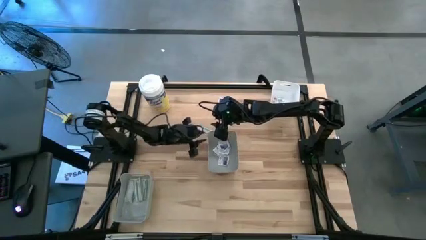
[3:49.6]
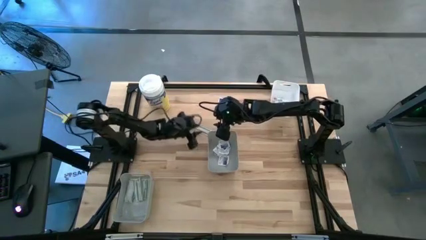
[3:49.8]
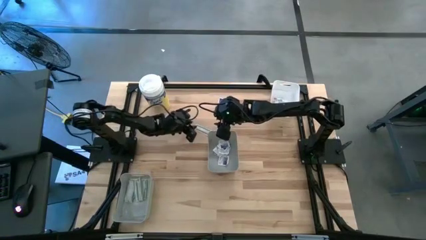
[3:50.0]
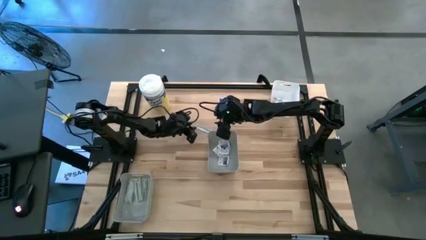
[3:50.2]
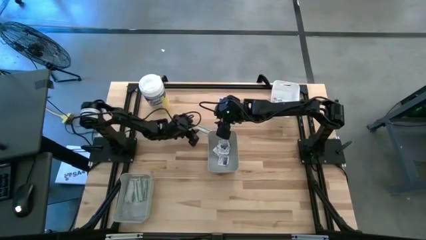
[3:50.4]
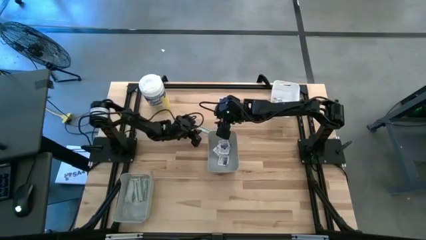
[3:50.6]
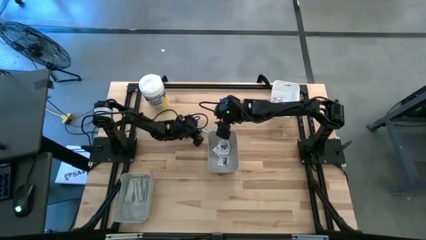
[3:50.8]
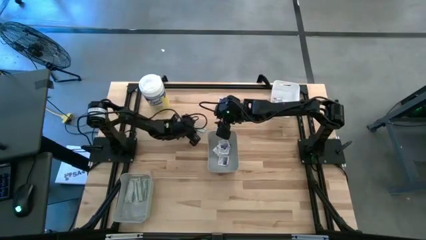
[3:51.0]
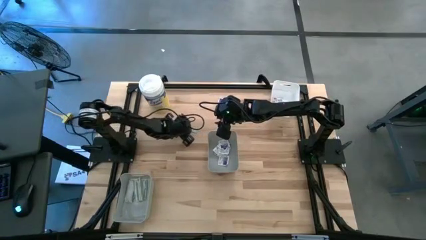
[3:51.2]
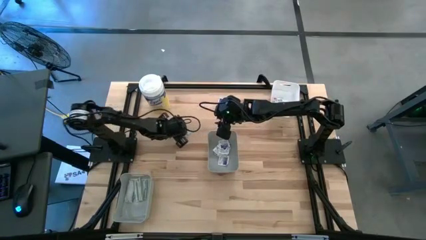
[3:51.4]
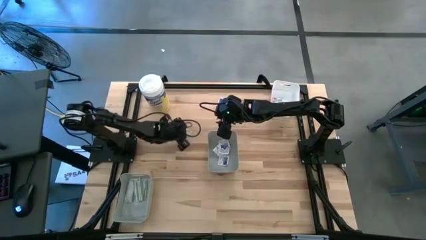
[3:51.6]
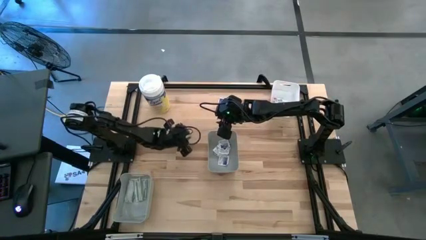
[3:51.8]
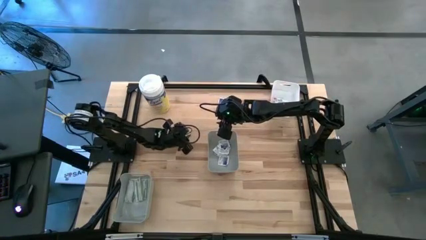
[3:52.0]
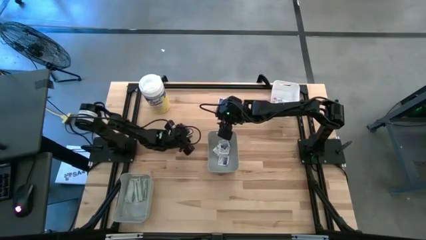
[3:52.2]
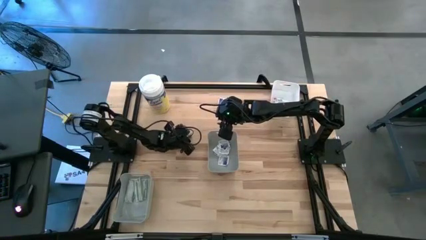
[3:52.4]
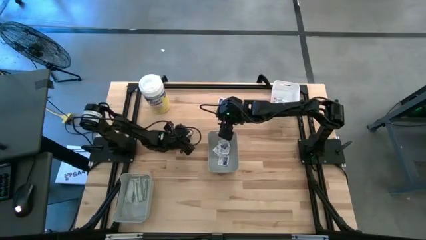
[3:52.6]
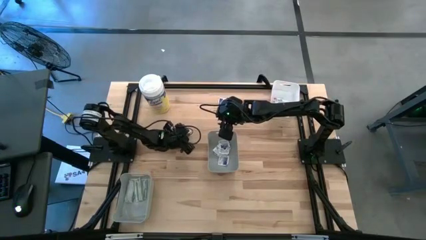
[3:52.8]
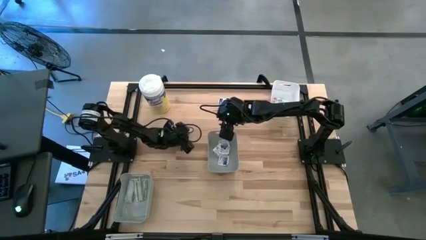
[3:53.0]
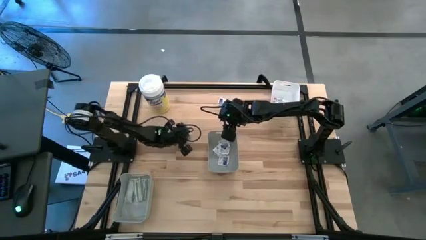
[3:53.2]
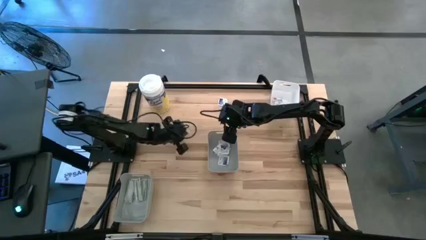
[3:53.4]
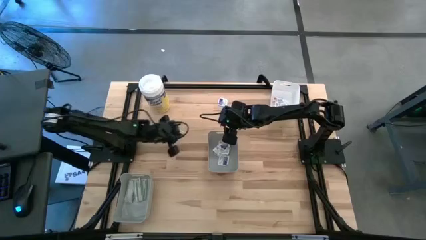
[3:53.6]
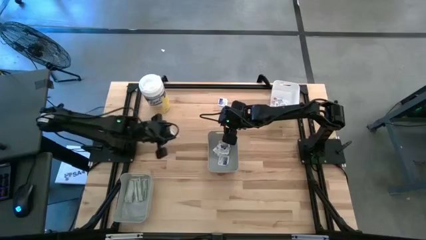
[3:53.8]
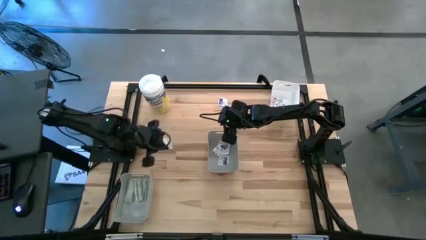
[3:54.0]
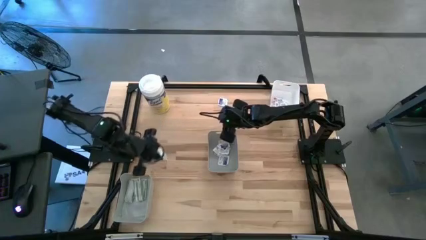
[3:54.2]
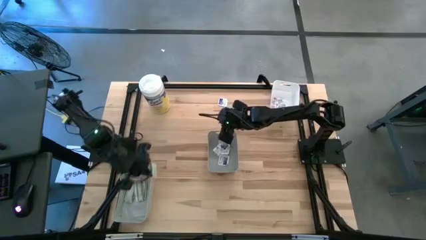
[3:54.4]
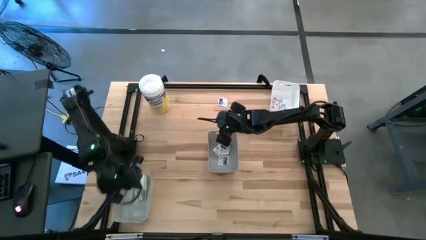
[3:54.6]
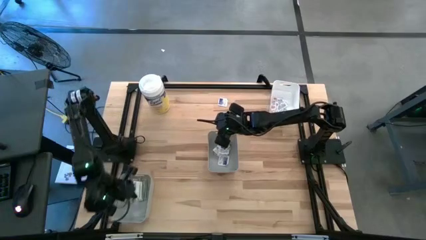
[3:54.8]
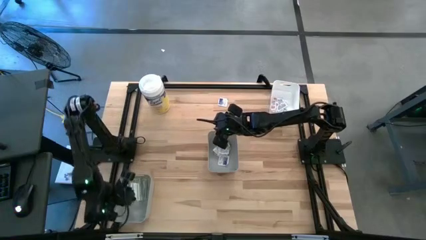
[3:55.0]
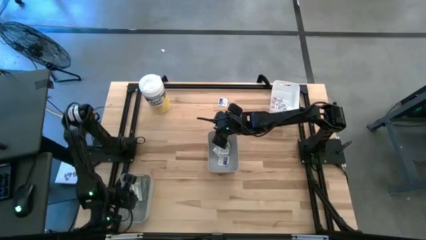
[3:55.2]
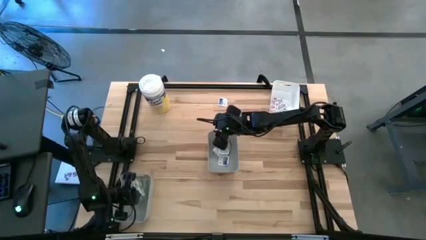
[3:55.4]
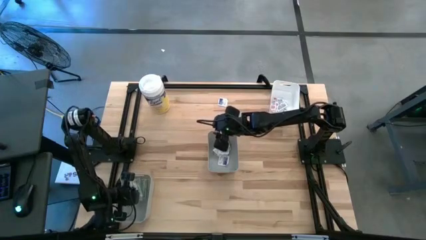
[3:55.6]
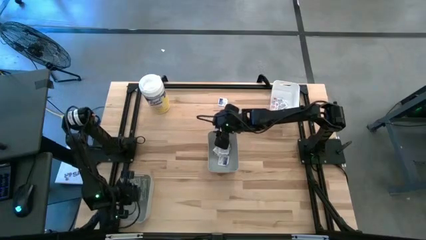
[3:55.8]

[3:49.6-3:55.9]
Task: Pick & Place First Aid Supplies
Put the green pad into the bottom gray bin

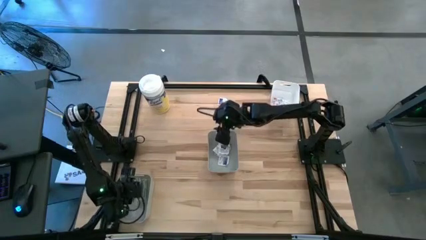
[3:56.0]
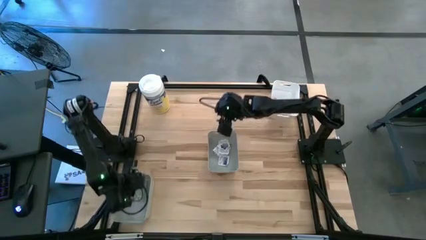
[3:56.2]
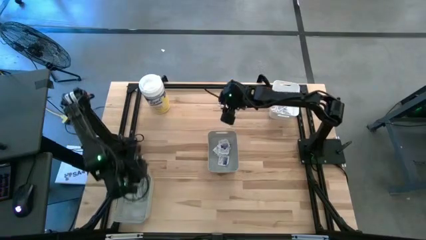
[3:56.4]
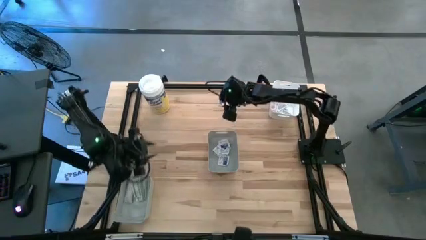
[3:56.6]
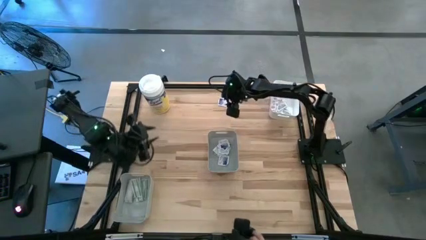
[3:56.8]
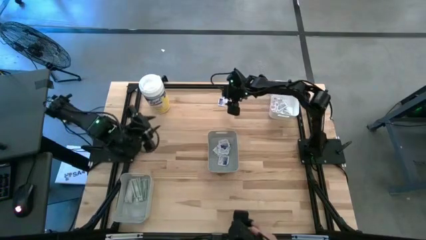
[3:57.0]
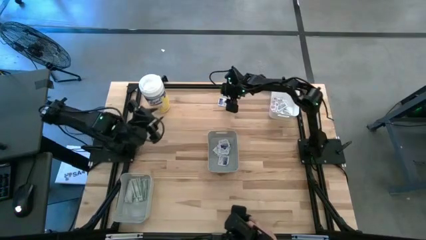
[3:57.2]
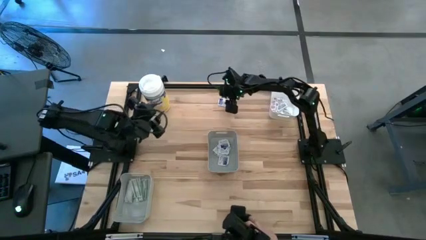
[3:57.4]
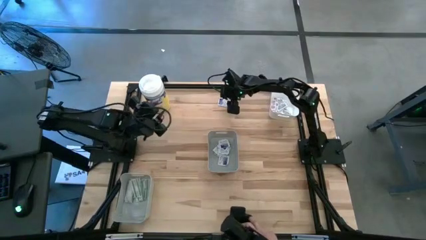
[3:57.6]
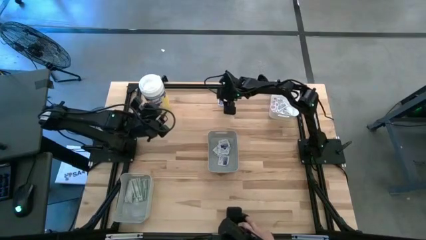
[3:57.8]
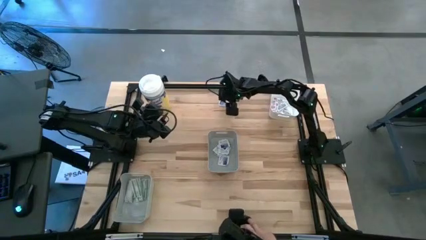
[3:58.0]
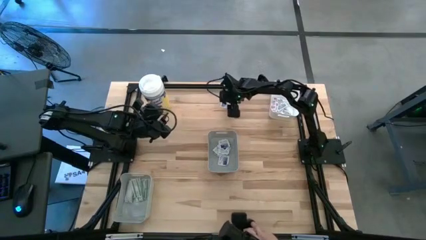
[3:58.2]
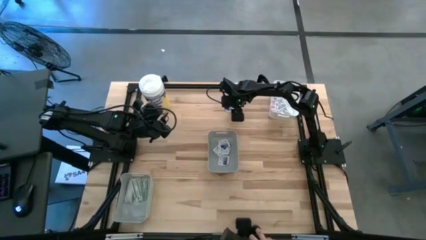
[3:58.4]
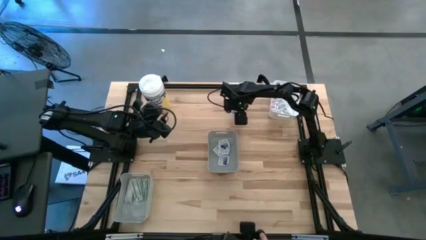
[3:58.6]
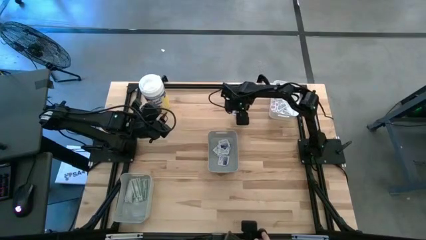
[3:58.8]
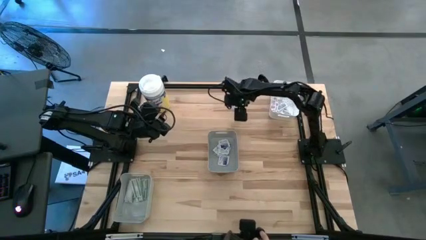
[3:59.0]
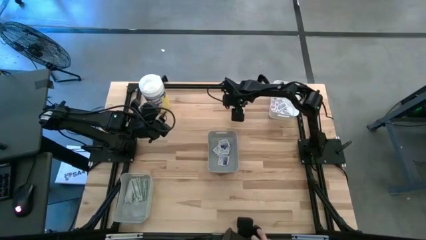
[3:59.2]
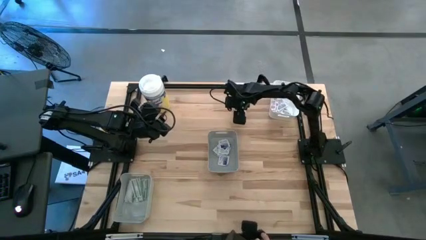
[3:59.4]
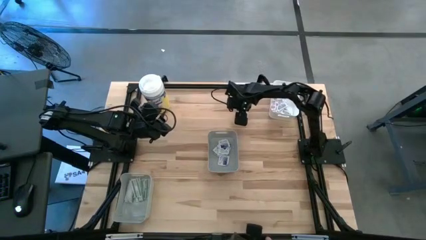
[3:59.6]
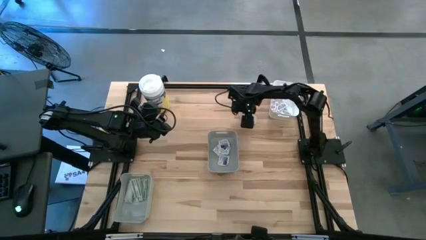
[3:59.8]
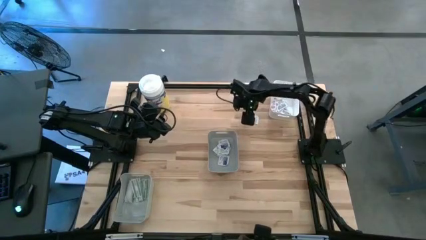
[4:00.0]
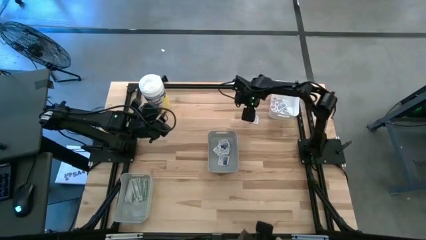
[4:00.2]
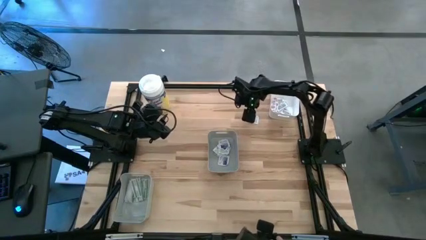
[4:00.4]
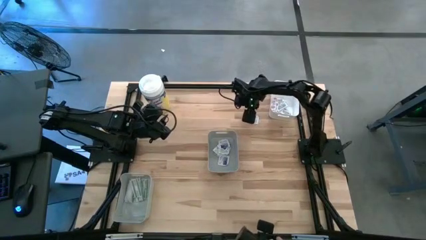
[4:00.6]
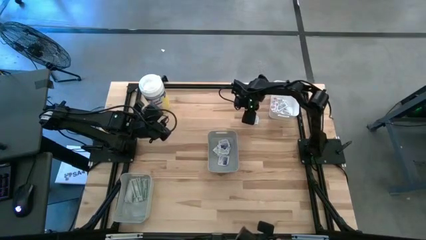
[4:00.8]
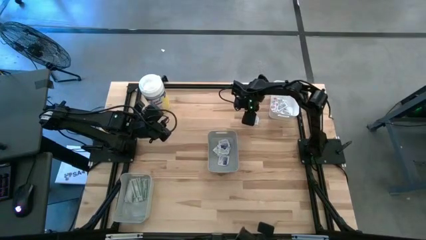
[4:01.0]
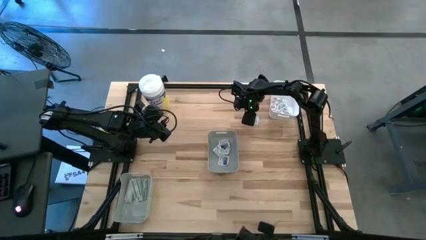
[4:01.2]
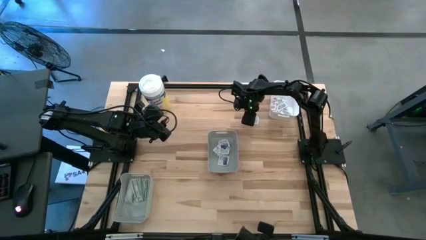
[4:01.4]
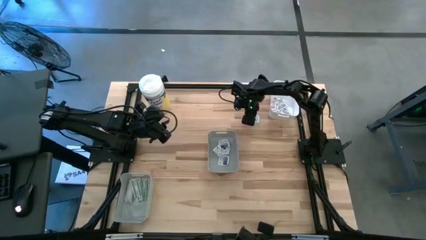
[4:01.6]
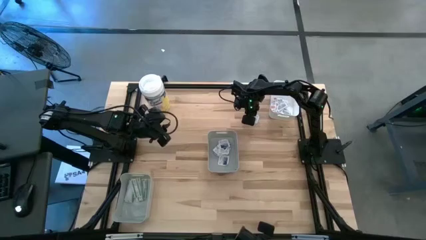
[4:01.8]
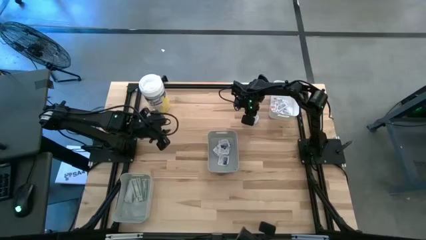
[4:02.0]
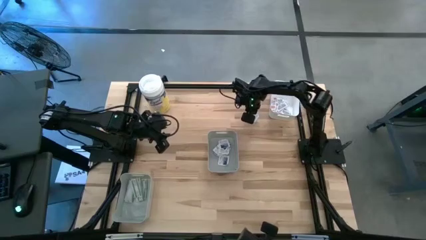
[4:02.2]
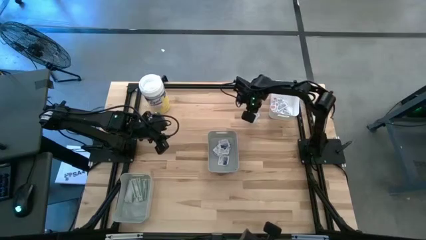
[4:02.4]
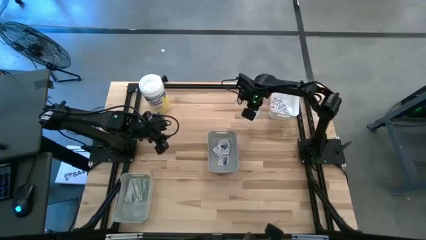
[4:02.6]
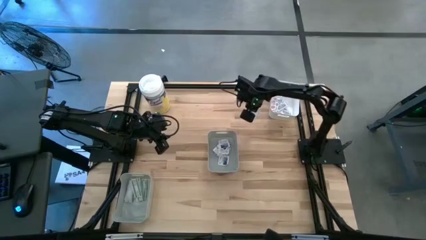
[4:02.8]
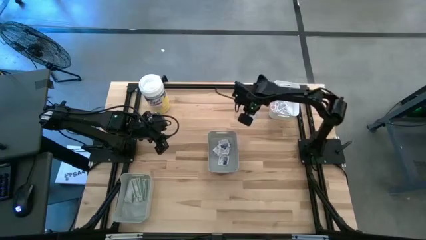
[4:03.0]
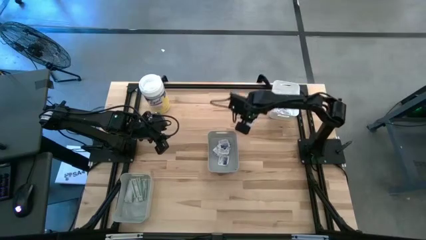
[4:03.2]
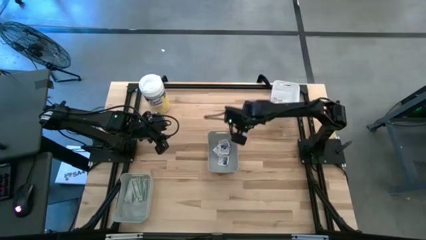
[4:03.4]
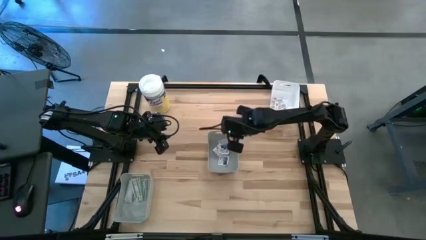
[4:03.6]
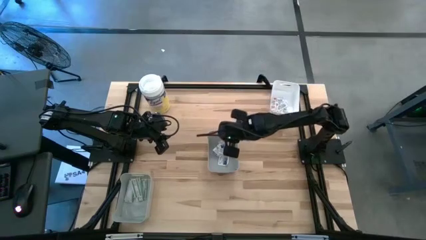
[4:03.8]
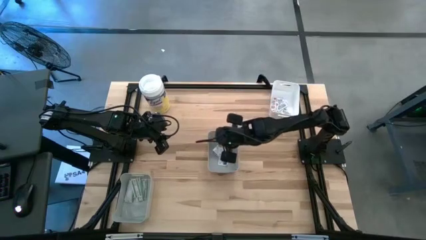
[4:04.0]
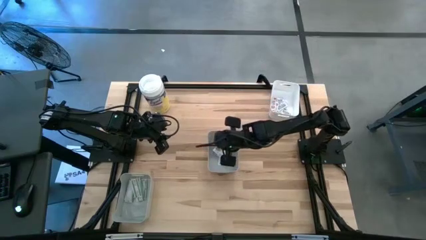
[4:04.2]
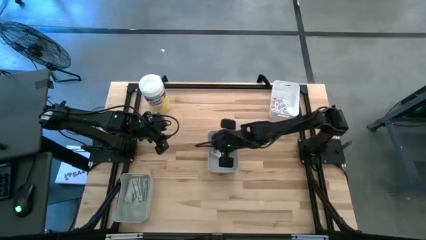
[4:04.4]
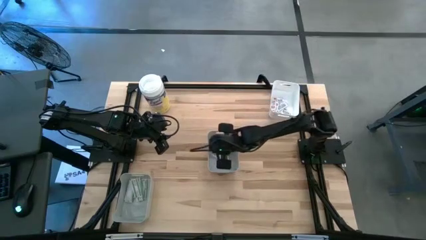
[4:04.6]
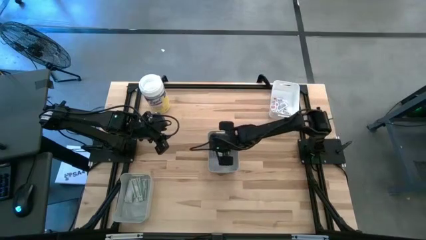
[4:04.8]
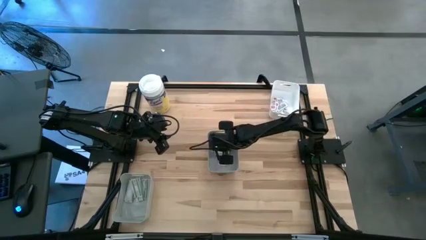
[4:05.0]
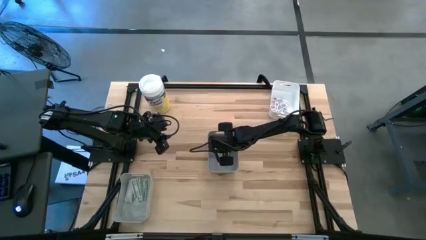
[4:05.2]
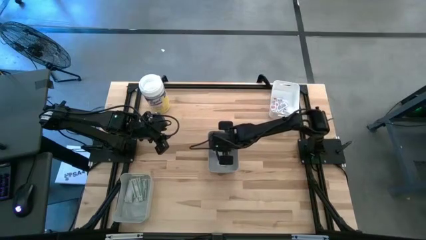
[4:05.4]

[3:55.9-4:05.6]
Put the blue pad into the middle gray bin
